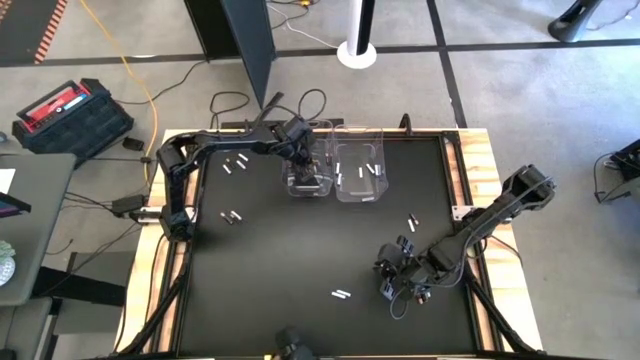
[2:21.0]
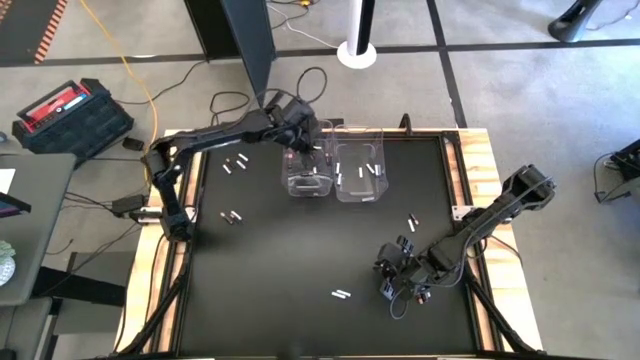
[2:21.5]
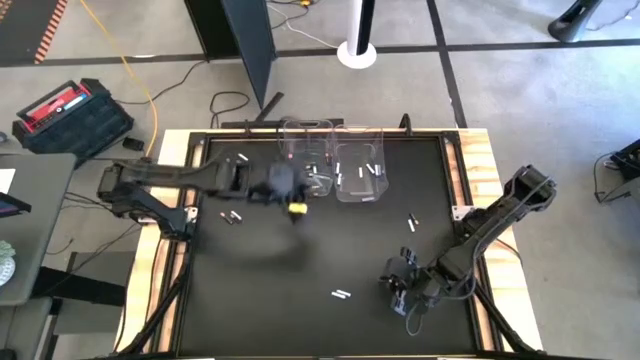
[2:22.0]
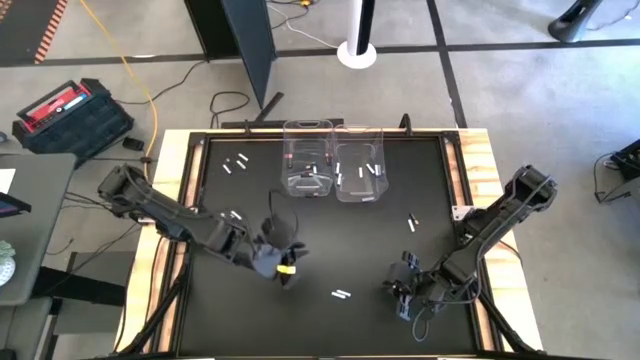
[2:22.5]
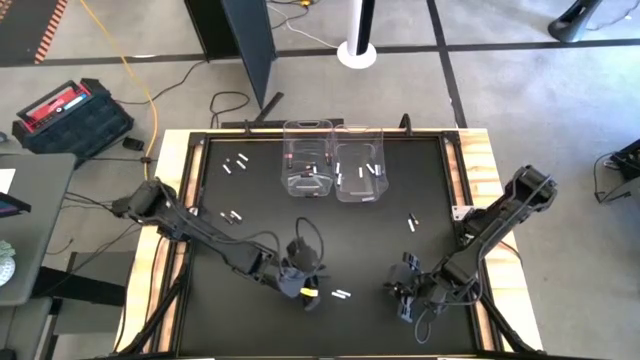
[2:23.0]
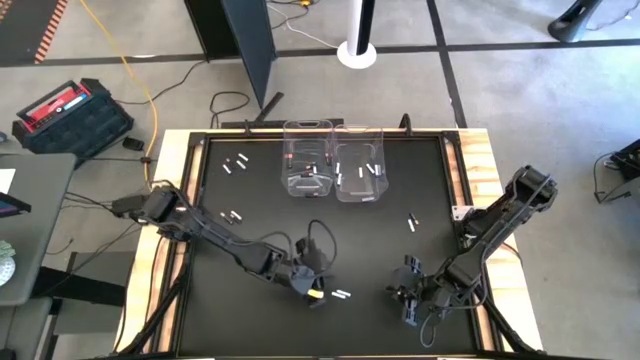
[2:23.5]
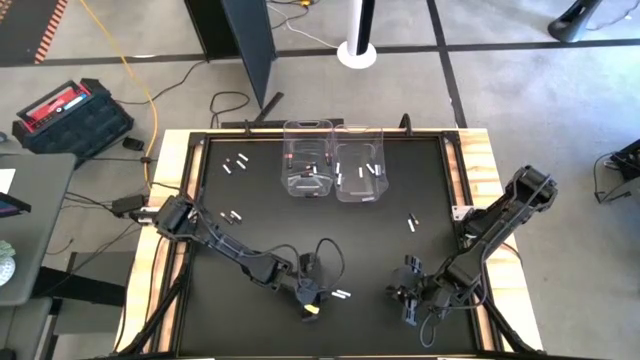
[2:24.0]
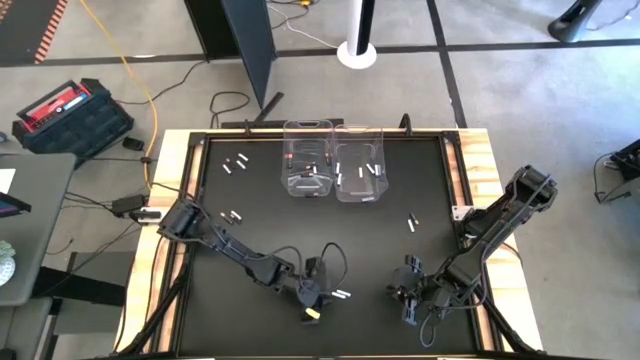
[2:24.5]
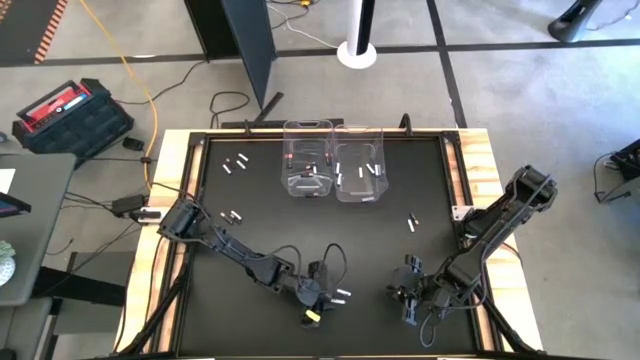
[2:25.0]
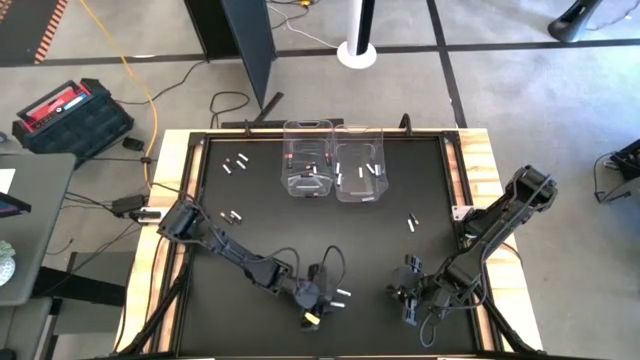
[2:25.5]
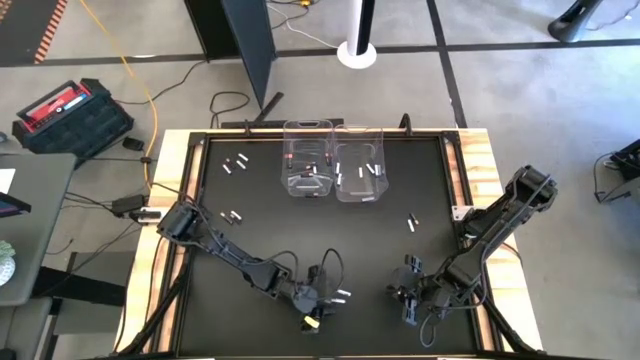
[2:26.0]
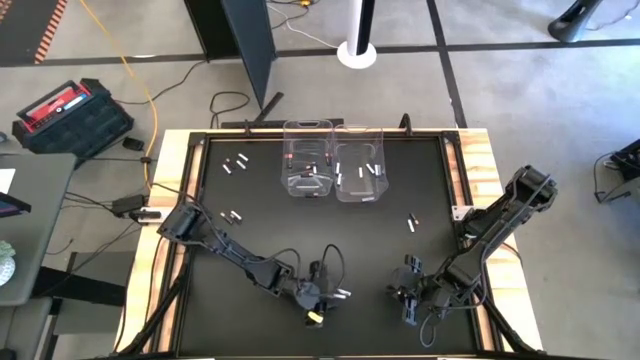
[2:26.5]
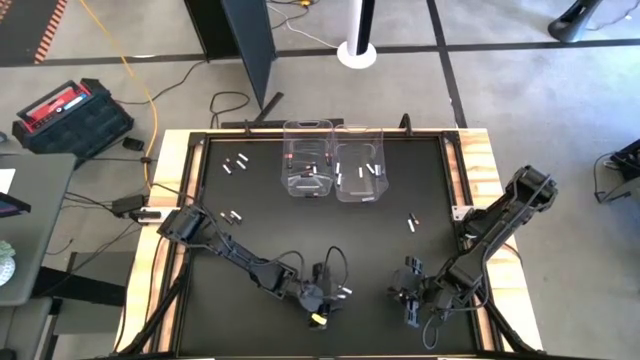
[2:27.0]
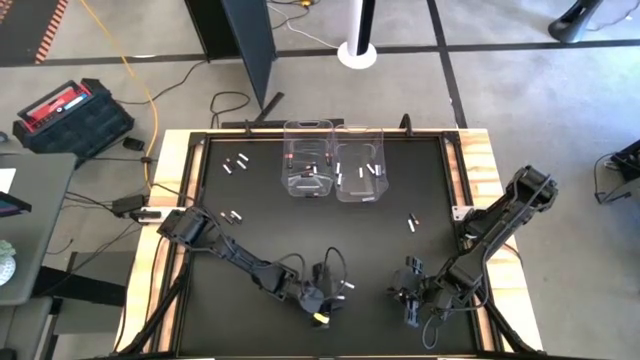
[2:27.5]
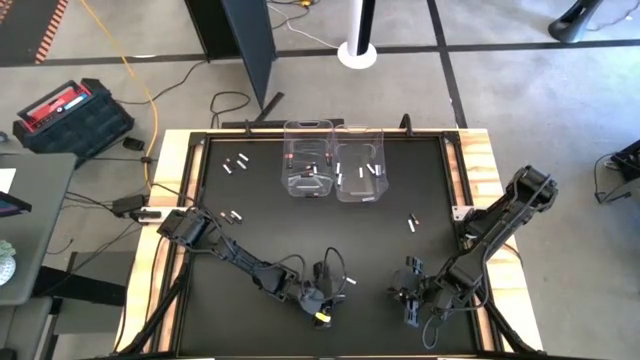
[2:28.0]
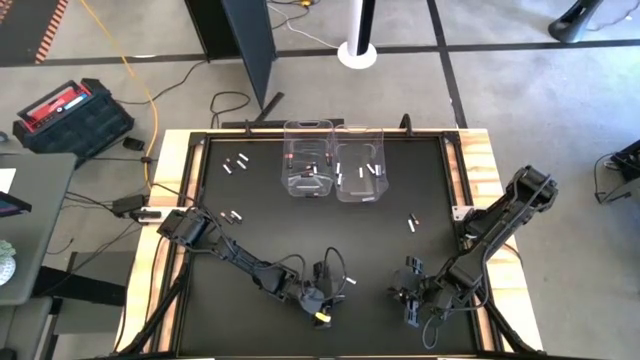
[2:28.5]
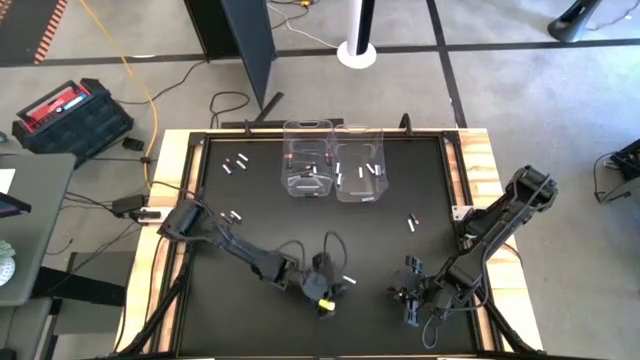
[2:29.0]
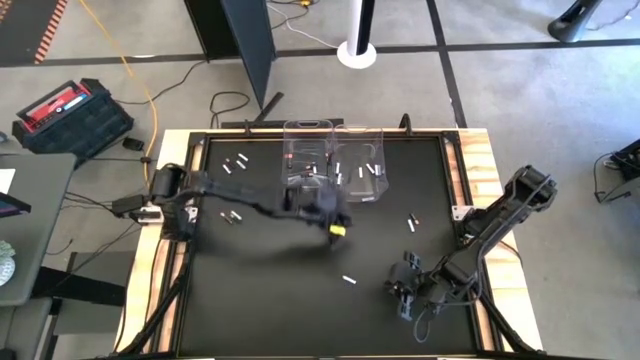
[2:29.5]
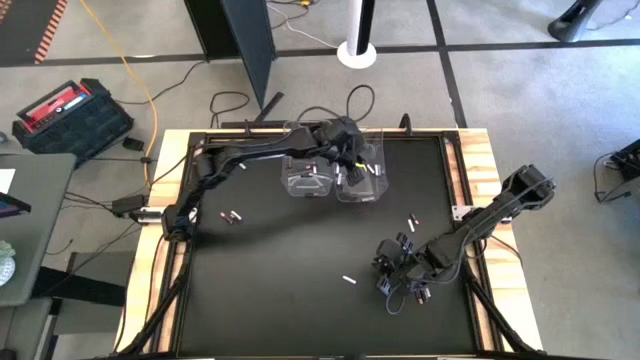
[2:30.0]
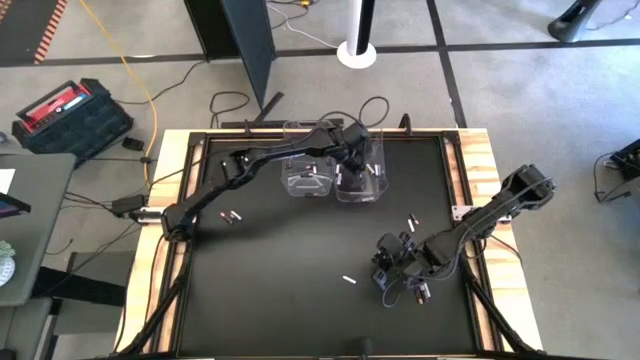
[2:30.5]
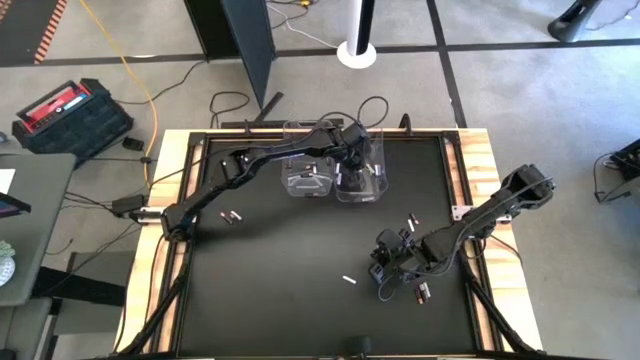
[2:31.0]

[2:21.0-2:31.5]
Task: Sort batteries
Put the white battery into the right transparent bin

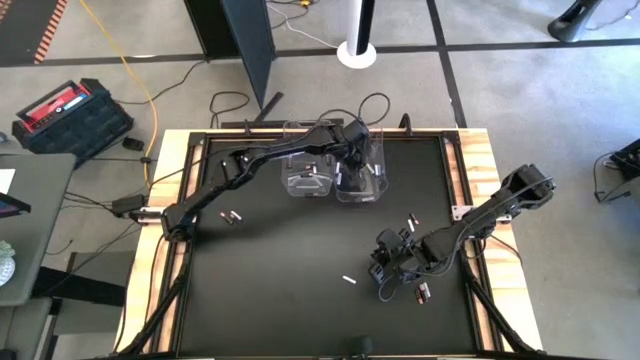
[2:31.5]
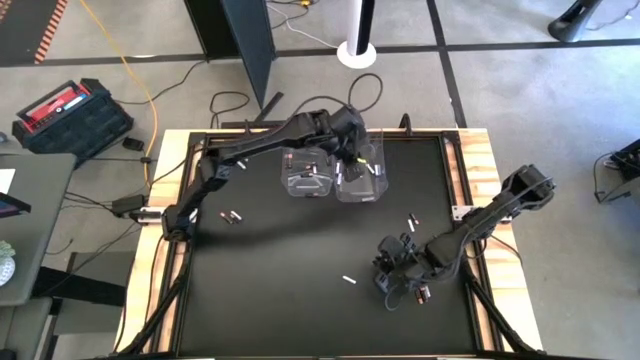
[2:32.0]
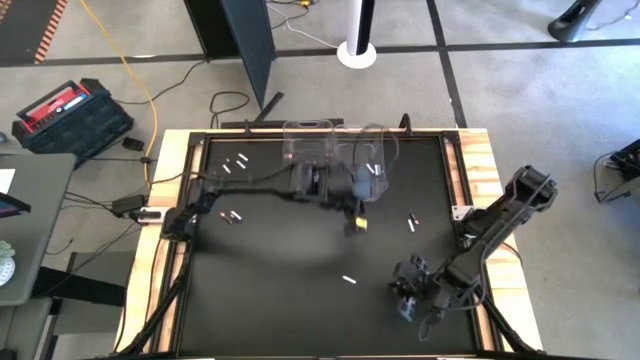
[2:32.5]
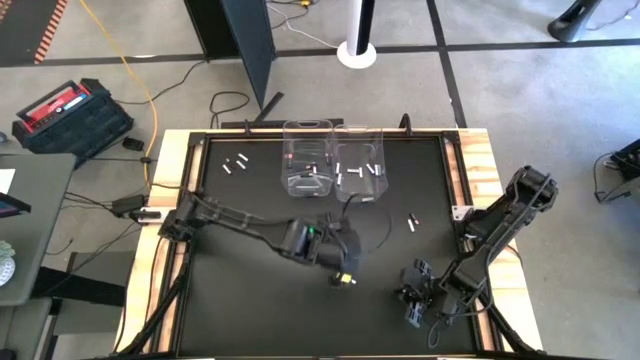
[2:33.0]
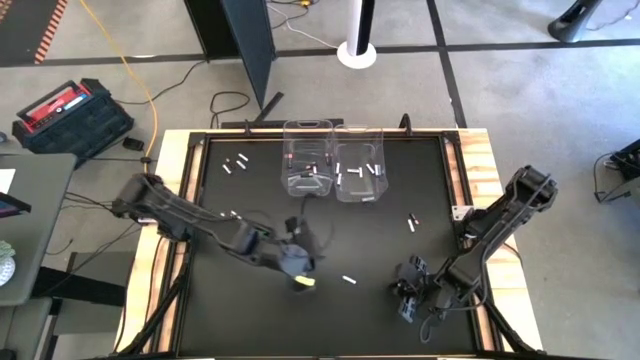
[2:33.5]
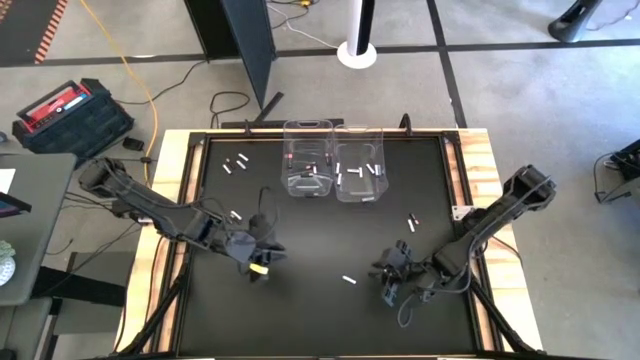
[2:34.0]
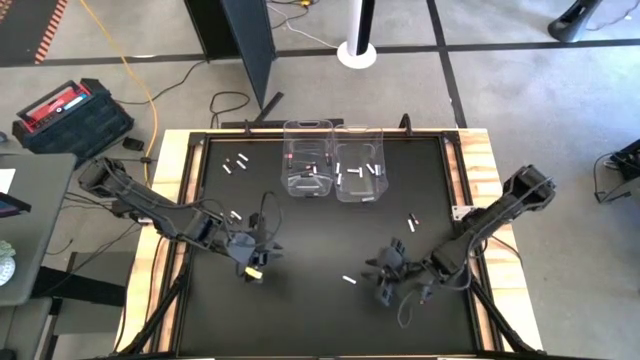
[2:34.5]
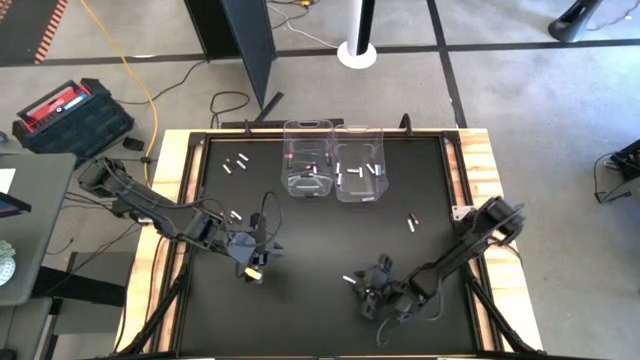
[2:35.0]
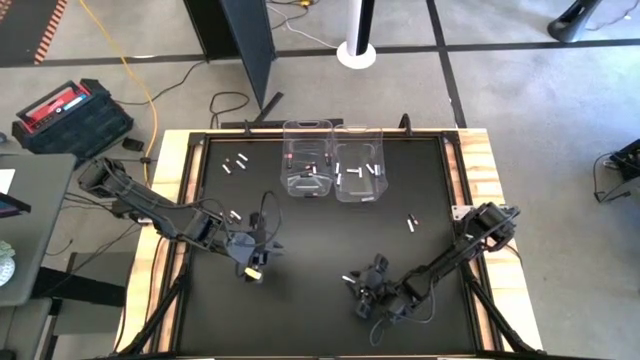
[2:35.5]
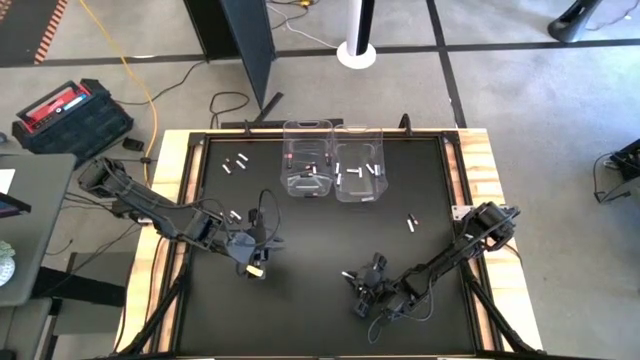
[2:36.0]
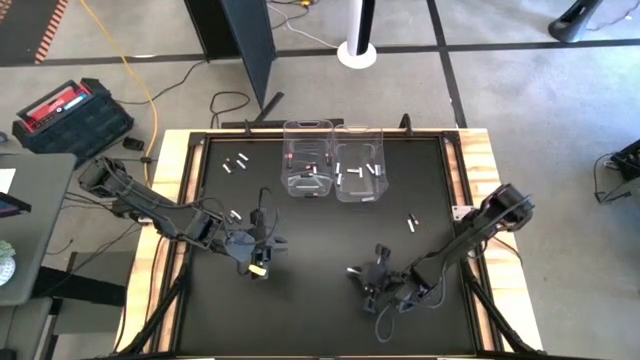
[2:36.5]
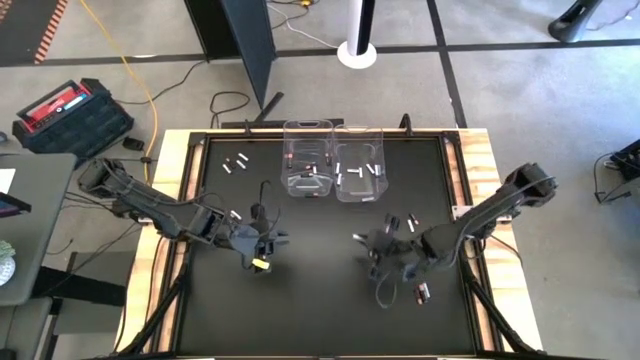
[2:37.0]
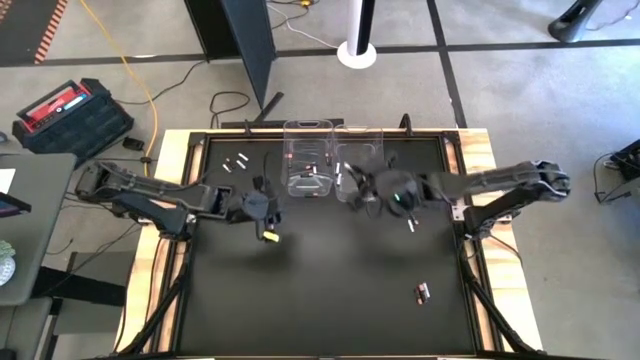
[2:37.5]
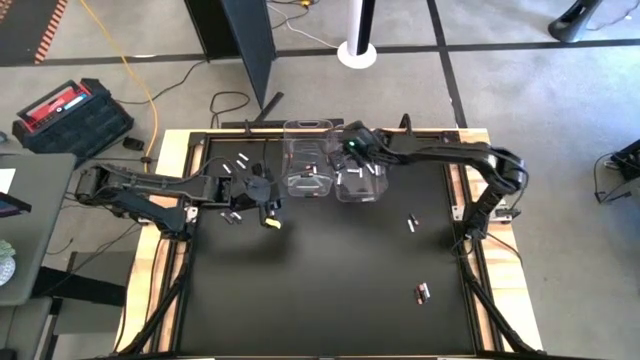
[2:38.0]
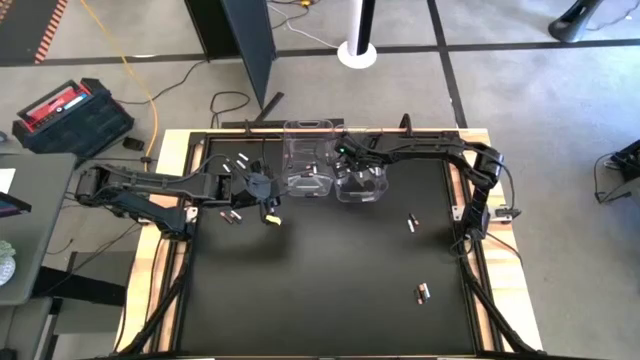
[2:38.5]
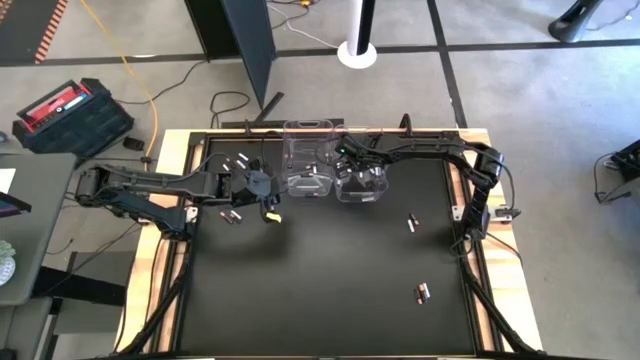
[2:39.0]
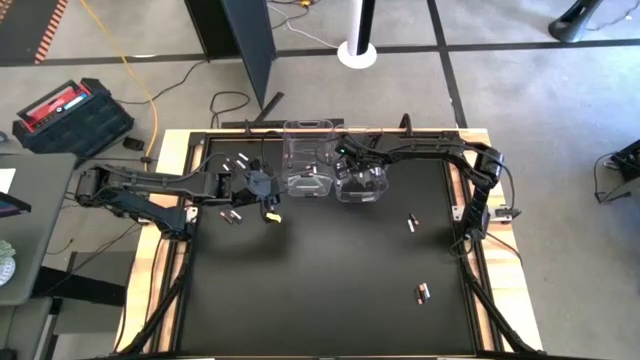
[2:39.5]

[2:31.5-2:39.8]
Put the white battery into the right transparent bin

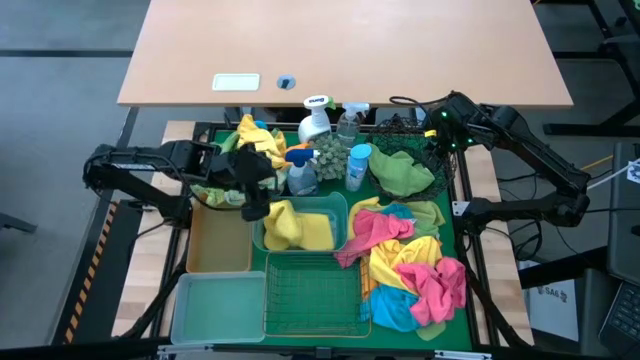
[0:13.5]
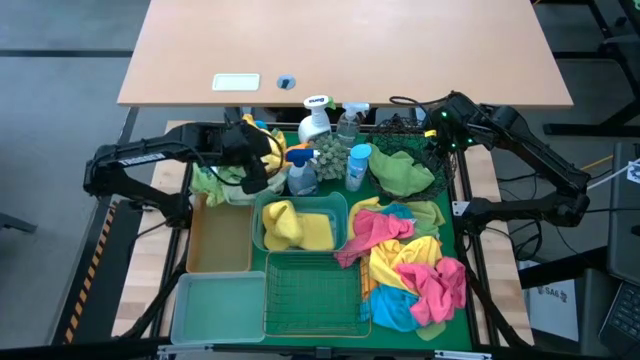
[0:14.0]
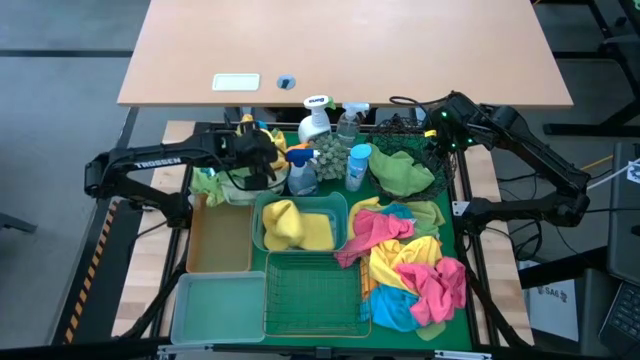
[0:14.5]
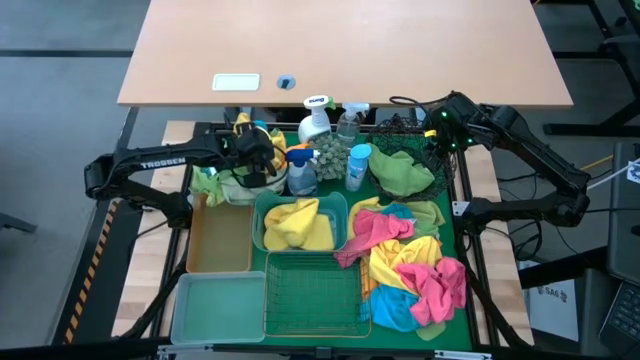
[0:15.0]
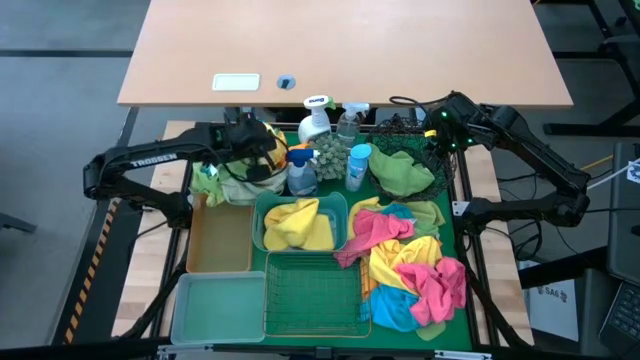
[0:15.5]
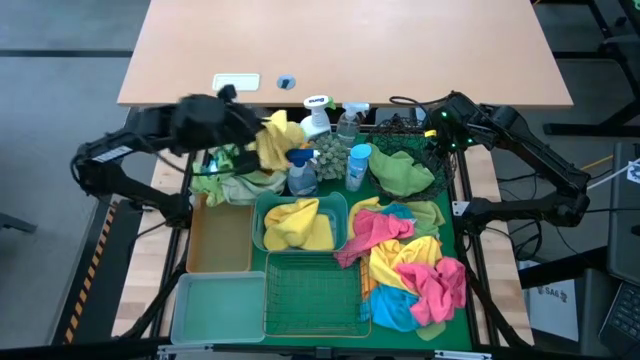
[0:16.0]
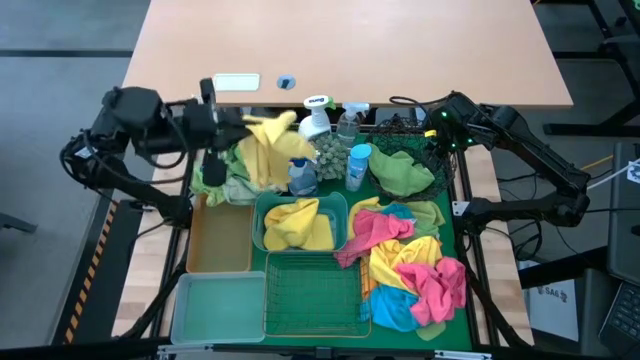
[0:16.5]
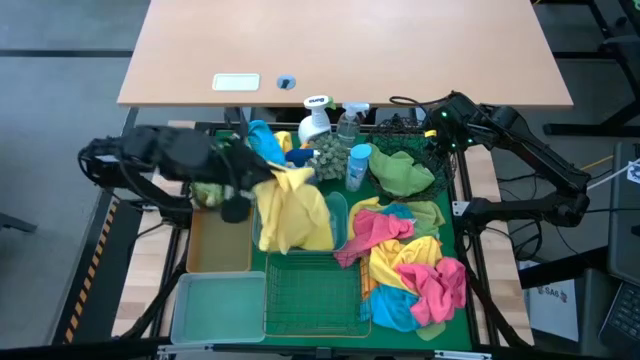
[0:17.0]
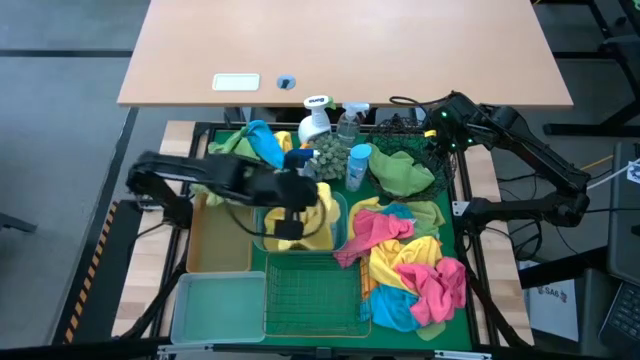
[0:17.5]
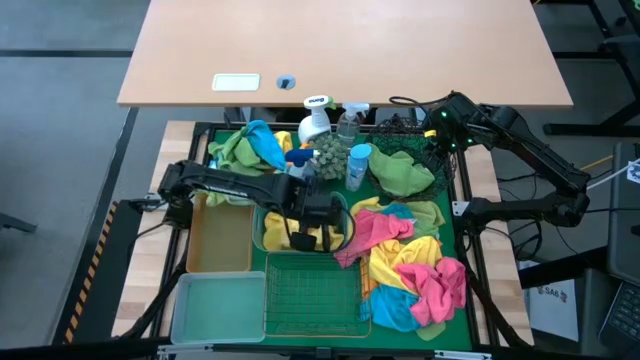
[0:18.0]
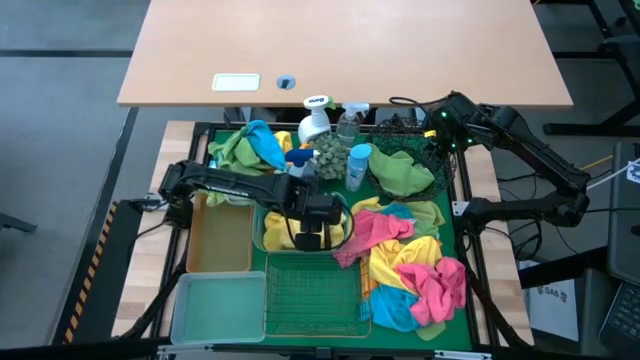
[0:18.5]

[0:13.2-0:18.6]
Task: Sort microfiber towel by color & place in baskets
Put the yellow microfiber towel into the blue bin
